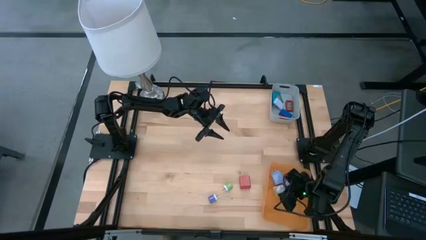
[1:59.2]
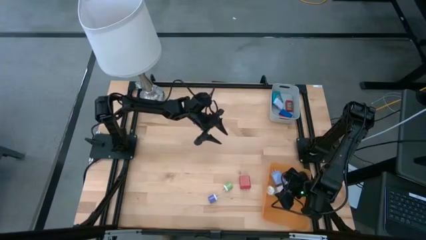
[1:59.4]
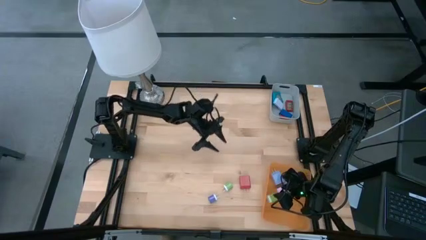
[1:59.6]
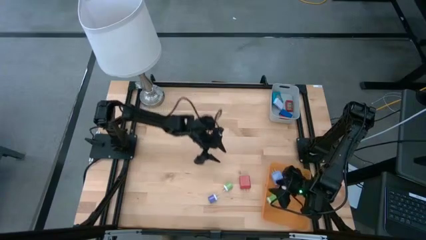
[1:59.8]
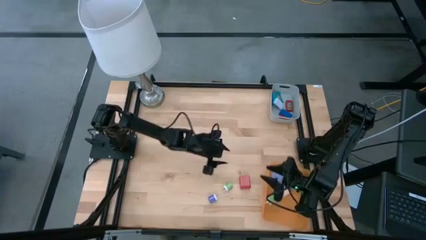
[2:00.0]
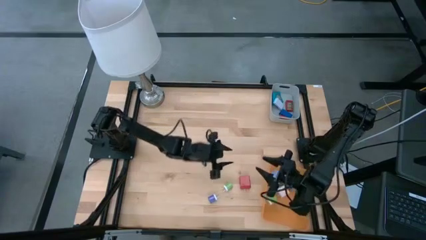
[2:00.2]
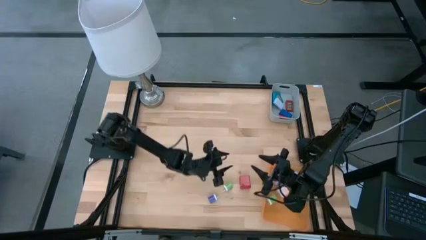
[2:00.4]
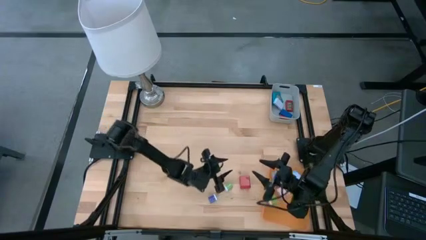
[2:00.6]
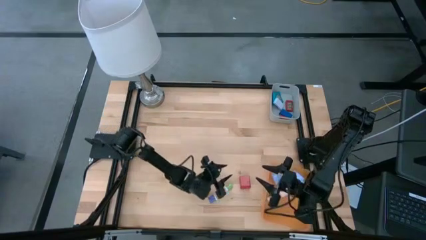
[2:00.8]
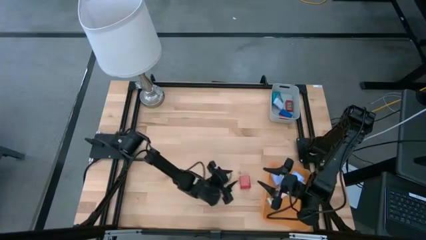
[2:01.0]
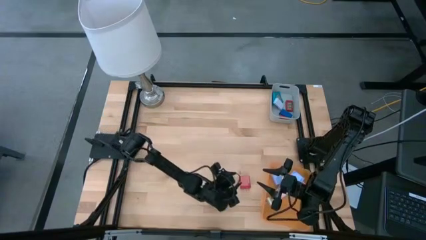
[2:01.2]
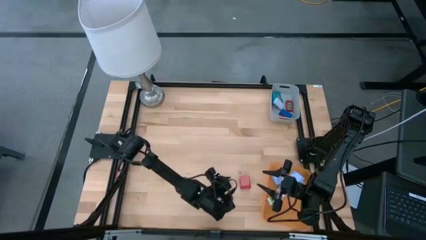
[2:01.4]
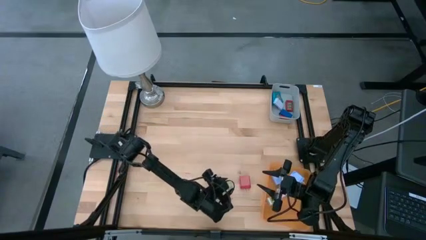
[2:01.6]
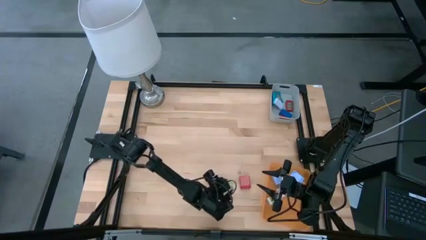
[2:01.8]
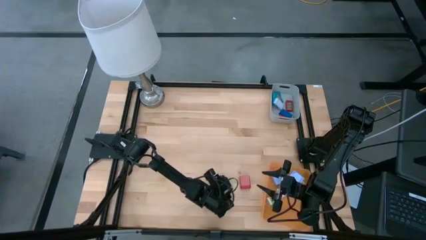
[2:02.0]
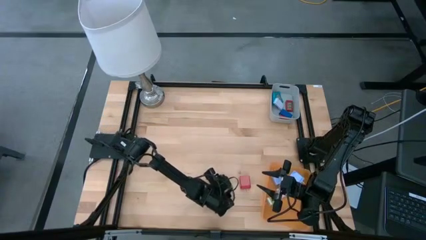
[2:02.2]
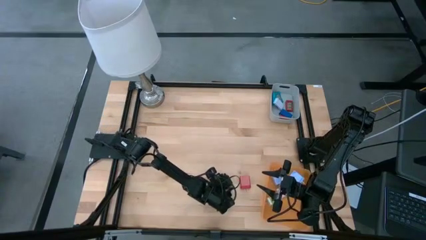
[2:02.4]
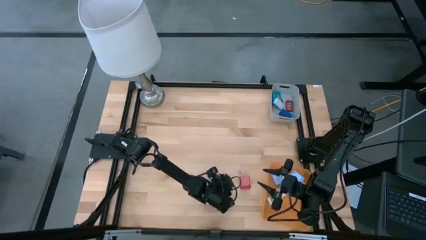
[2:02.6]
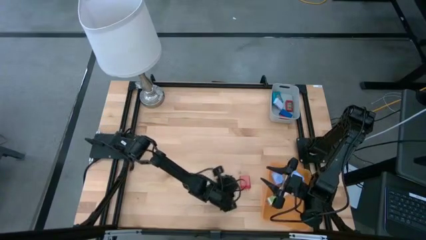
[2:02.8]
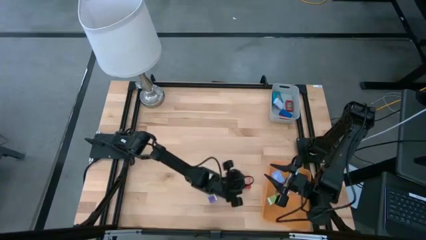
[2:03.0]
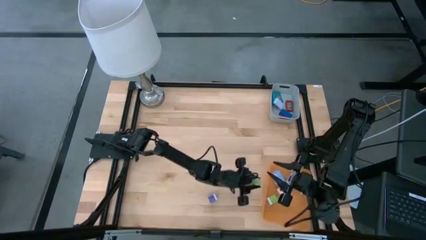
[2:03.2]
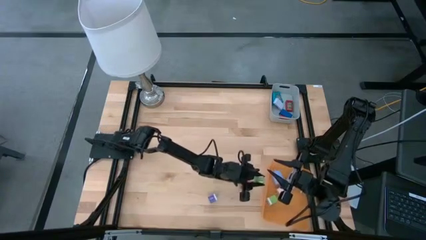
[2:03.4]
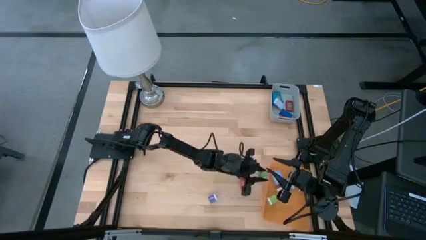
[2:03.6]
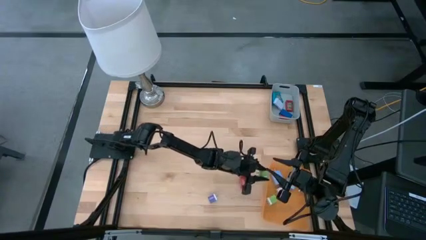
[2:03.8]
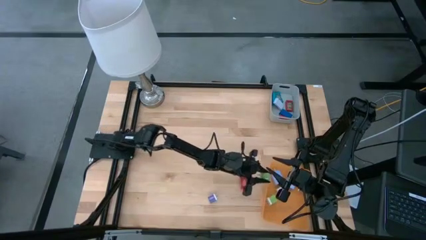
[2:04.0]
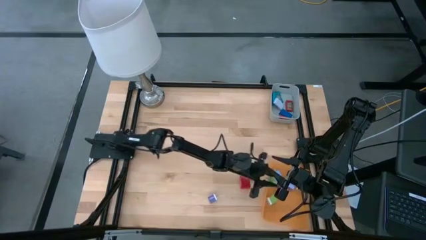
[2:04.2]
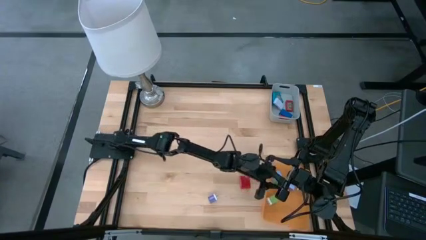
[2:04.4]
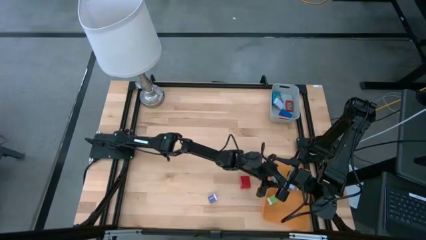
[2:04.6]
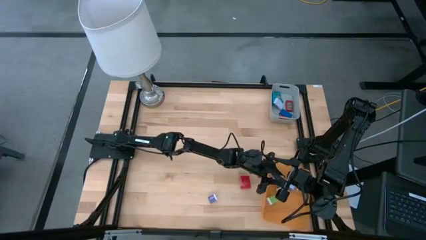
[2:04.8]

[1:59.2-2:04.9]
Task: Pick & Place Office items
Put the green charger adapter into the orange bin

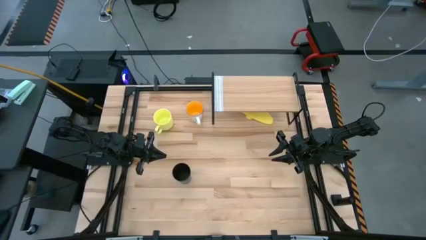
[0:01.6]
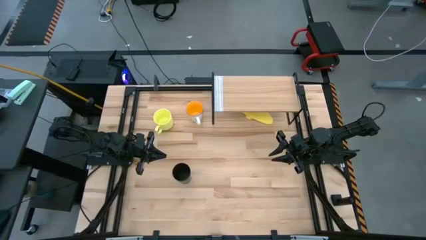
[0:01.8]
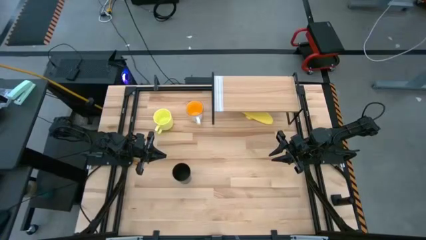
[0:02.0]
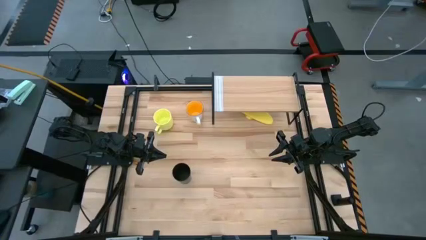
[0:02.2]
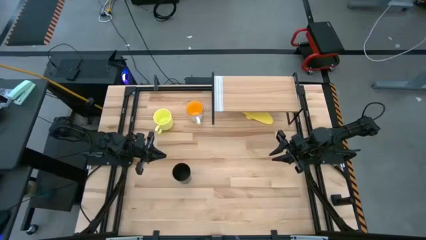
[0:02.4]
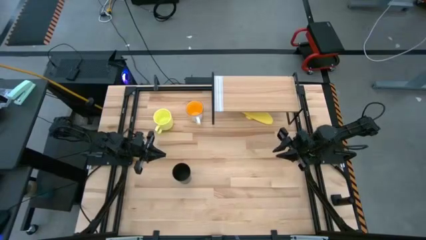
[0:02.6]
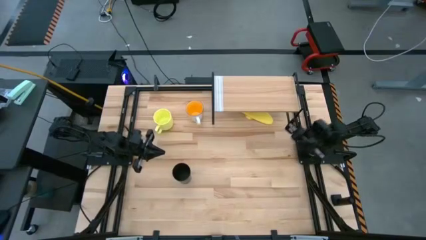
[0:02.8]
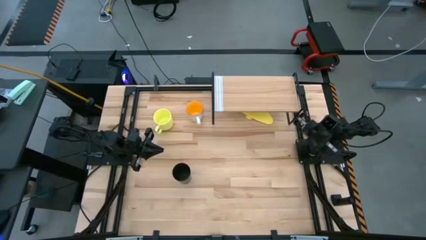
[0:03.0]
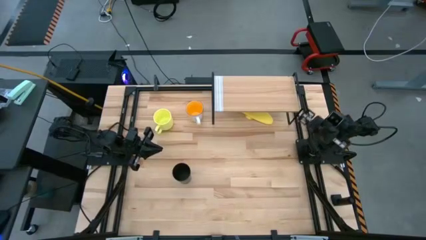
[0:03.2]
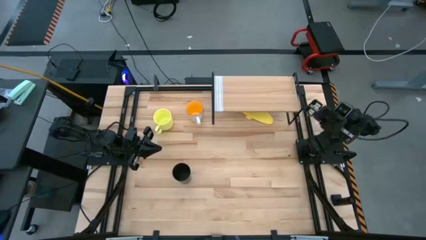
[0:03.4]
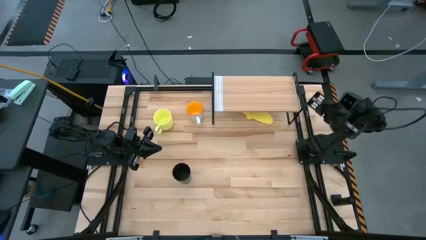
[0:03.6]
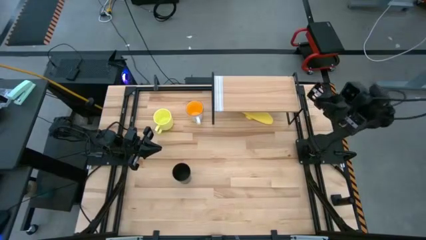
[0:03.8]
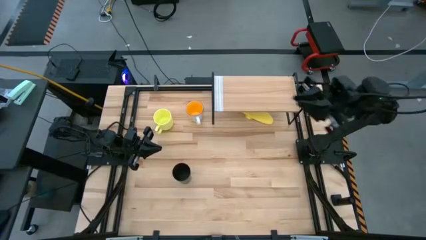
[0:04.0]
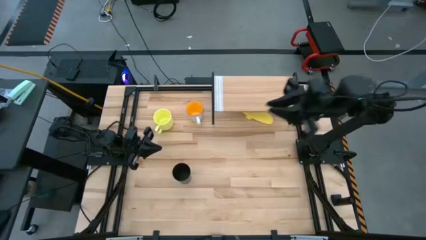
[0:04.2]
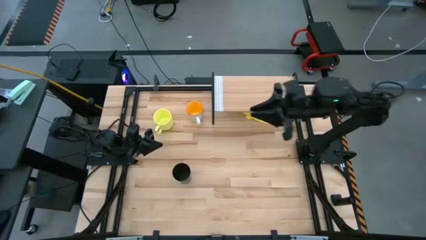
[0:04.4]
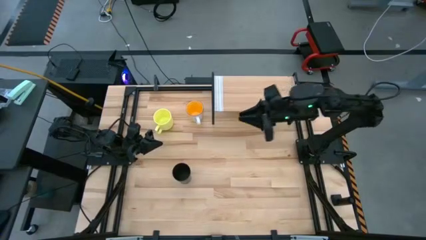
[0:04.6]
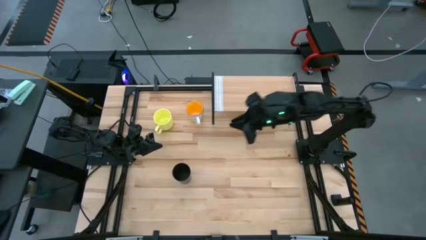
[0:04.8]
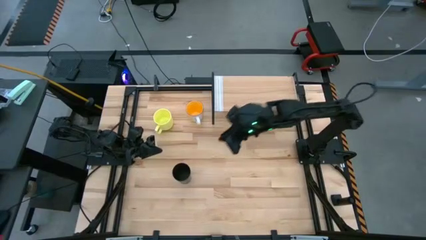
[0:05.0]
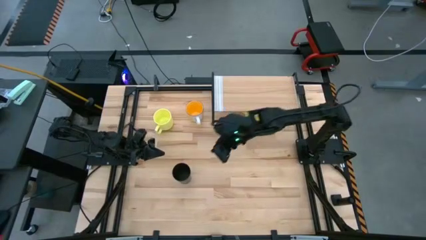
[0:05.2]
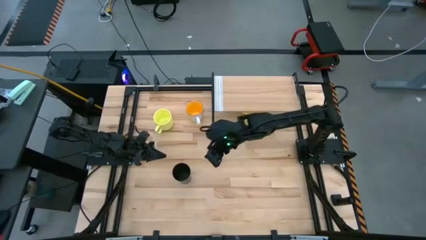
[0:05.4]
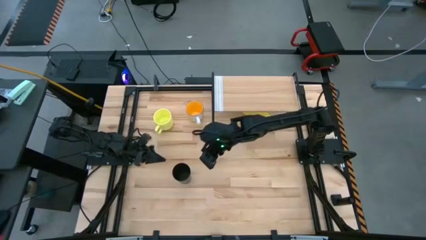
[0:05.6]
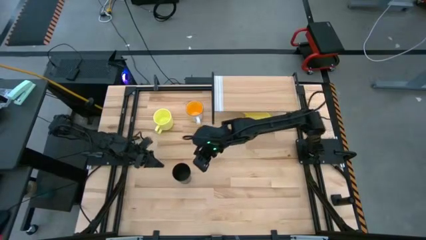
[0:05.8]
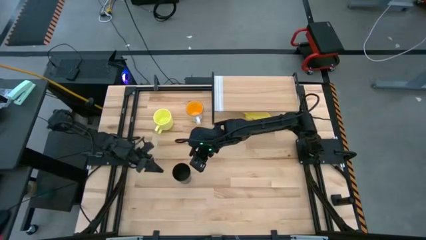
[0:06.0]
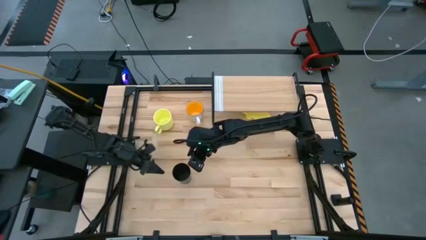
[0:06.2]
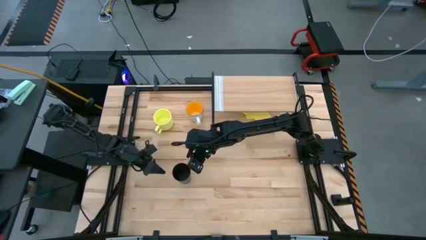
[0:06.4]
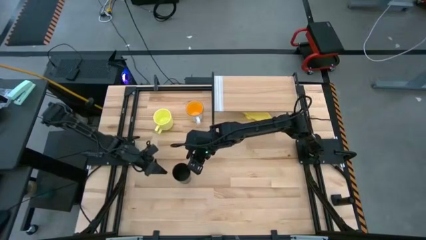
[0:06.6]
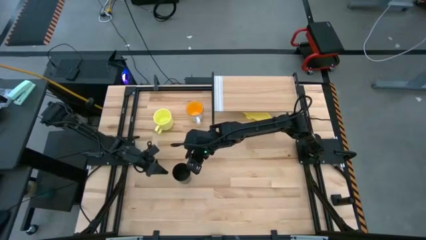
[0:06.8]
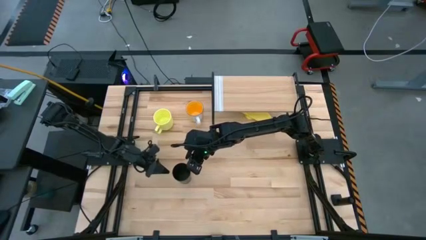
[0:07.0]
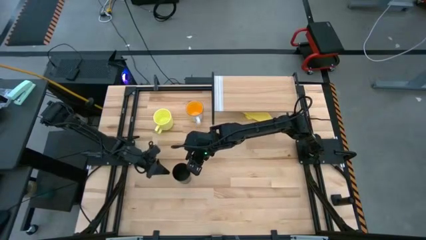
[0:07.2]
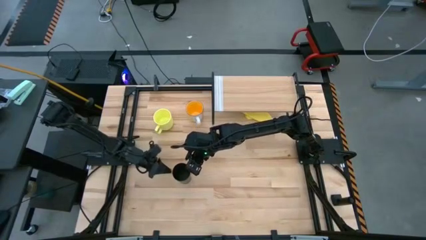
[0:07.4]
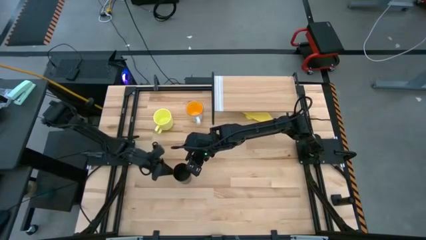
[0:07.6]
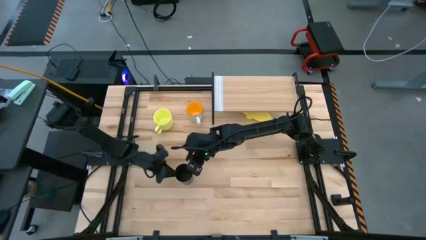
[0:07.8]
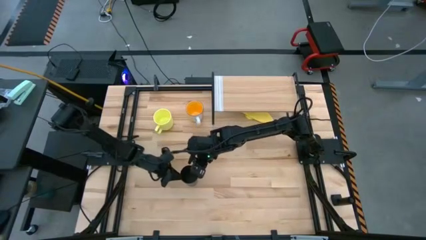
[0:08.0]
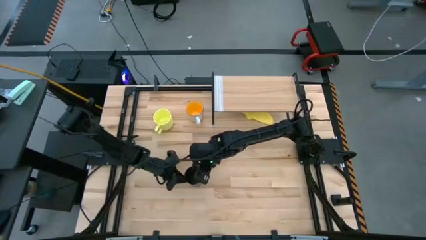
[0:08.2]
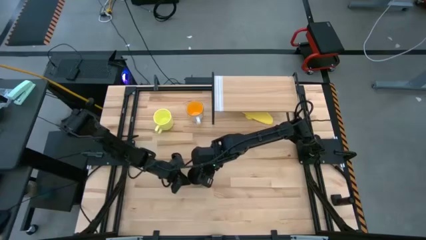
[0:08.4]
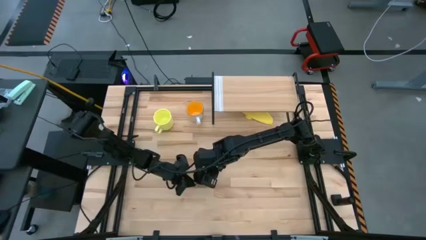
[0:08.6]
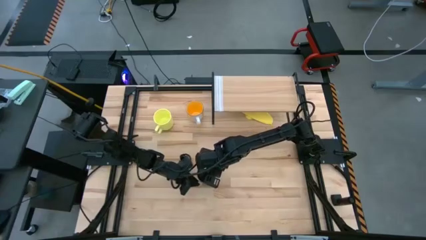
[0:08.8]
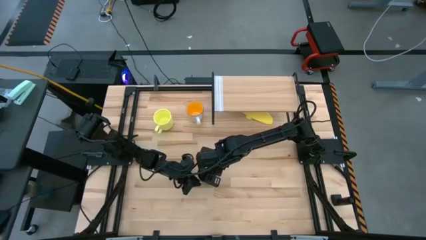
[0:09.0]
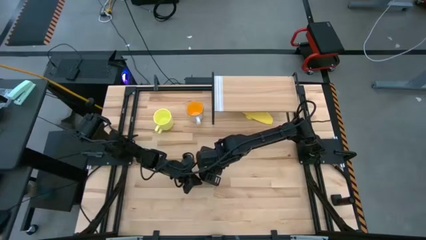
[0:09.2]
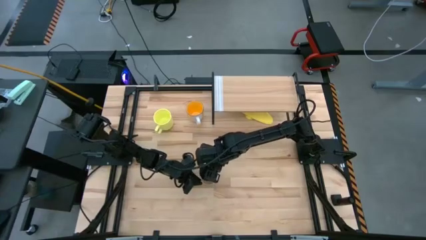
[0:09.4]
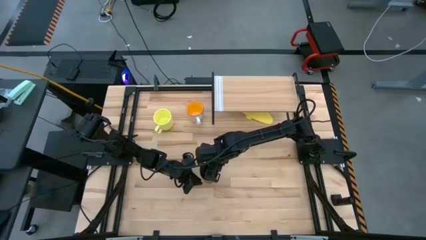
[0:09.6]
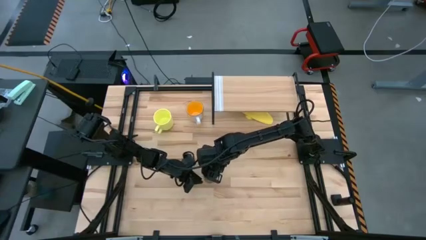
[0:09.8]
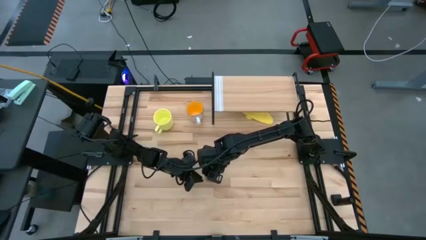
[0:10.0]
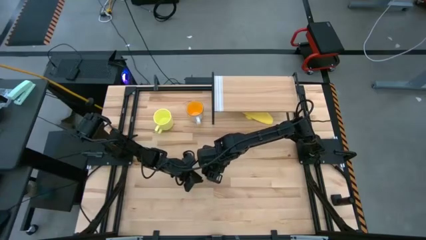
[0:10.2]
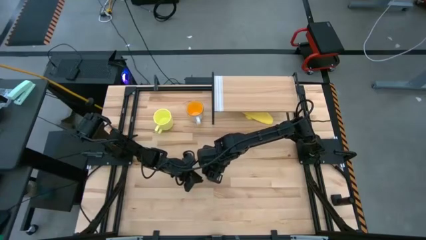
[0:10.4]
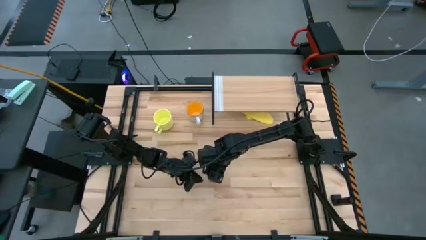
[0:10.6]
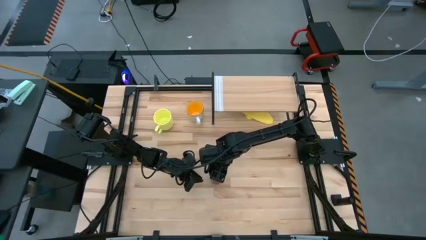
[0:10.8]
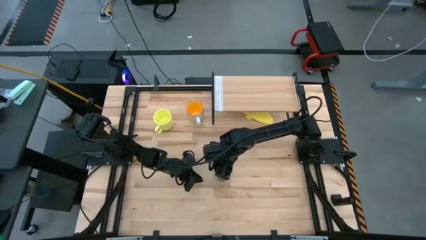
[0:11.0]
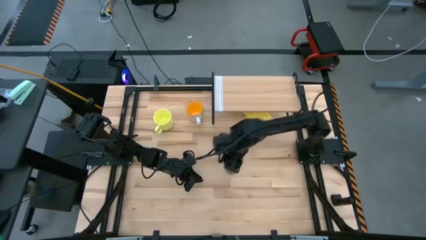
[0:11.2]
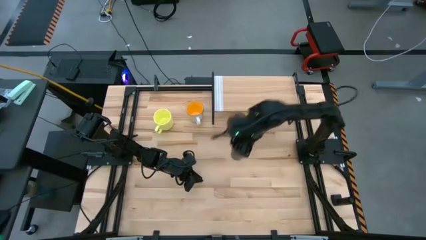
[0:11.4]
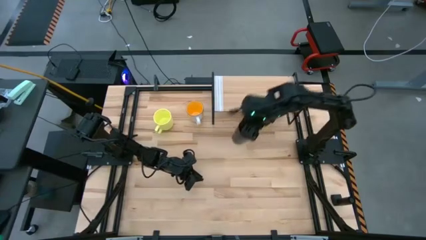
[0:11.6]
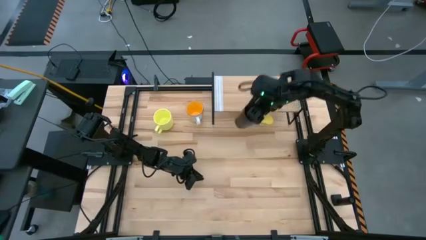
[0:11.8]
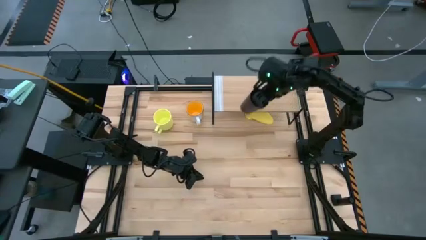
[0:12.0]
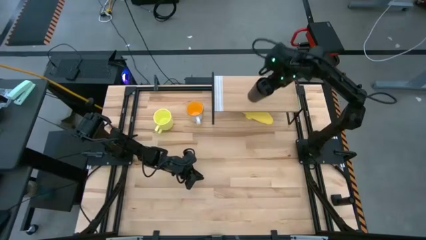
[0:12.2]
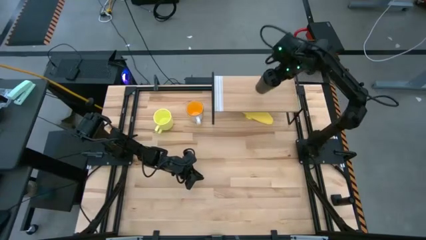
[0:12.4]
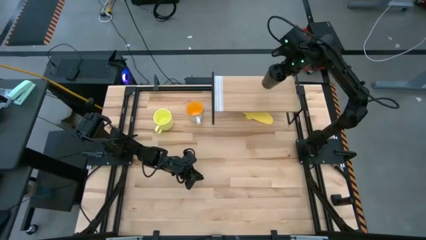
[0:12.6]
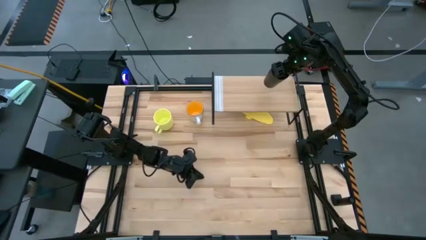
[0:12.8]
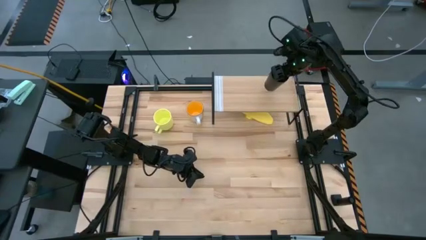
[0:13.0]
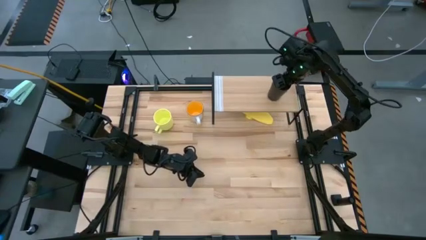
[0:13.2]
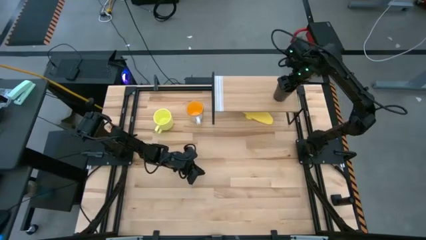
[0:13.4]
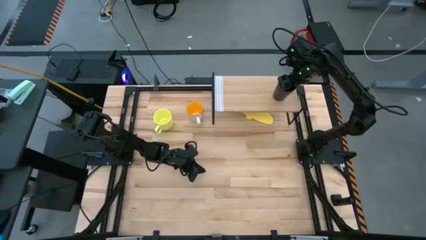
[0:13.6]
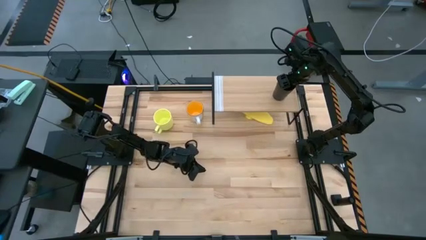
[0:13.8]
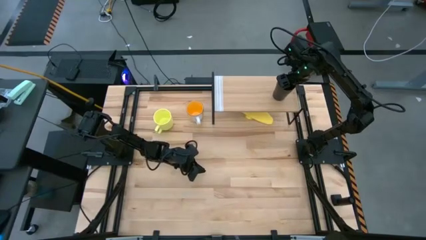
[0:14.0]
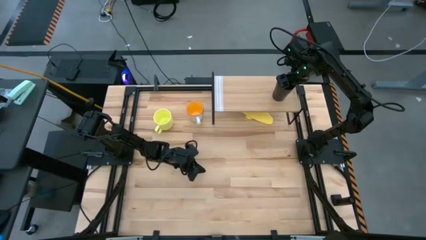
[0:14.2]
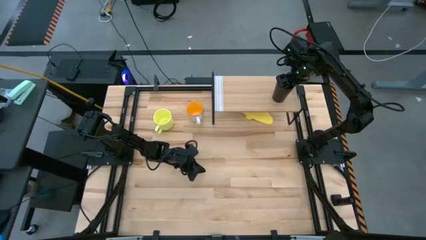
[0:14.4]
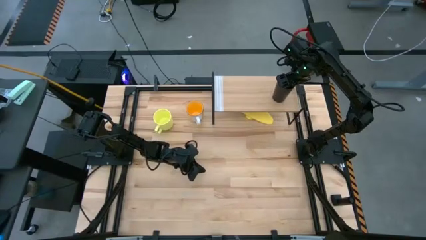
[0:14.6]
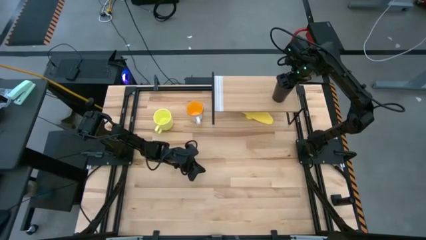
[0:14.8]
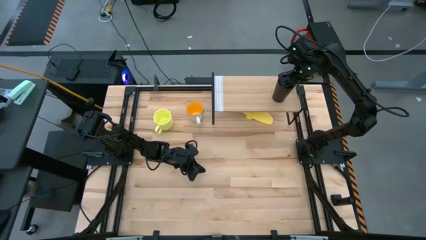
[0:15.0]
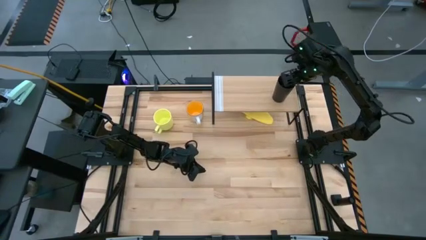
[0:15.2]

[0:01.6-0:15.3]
Task: Stack small to large cups/mugs on shelf
Put the black cup on the shelf
